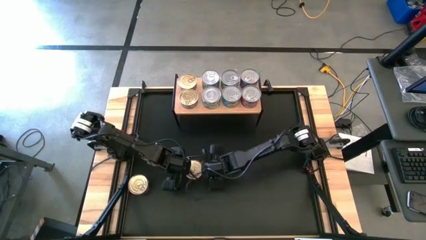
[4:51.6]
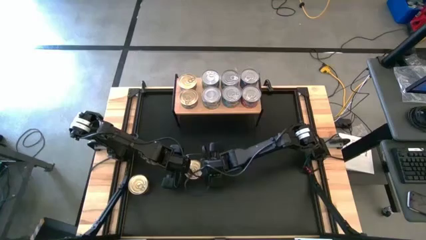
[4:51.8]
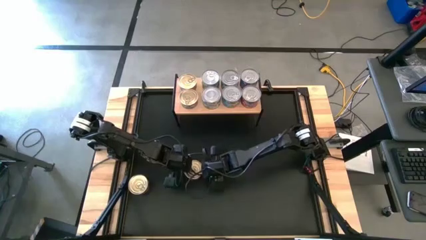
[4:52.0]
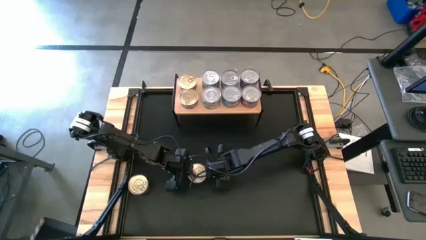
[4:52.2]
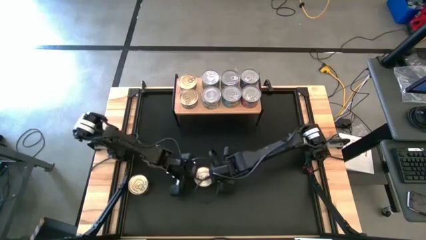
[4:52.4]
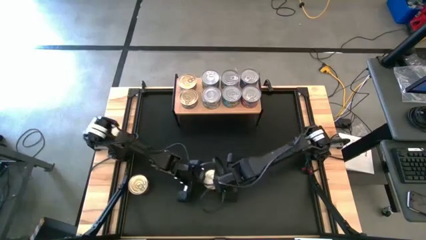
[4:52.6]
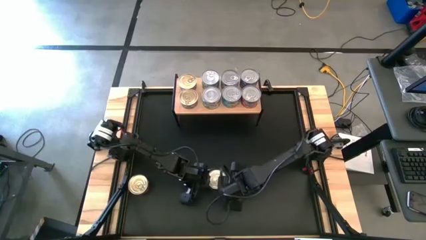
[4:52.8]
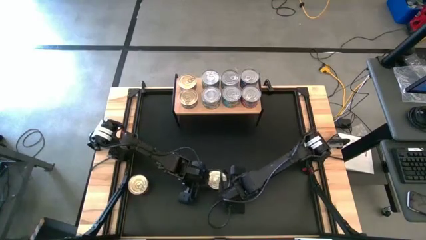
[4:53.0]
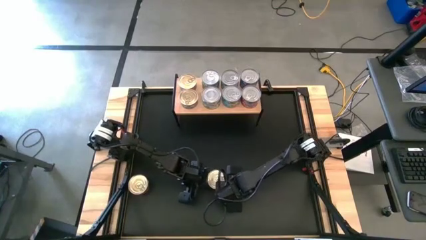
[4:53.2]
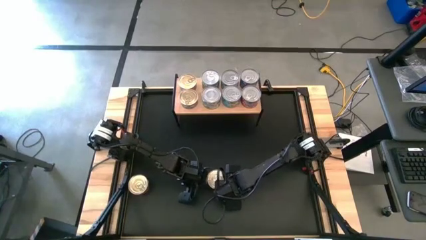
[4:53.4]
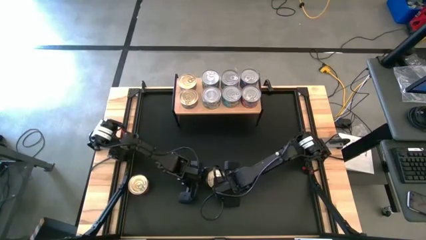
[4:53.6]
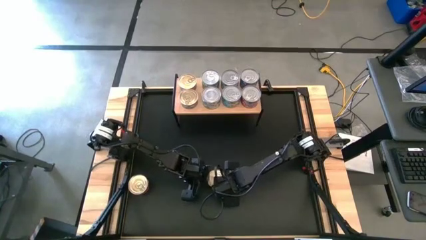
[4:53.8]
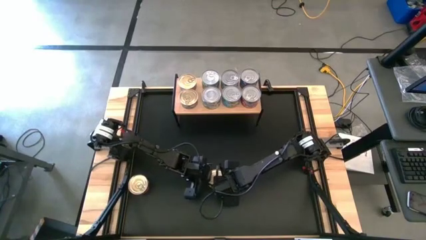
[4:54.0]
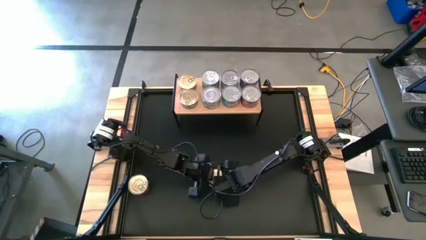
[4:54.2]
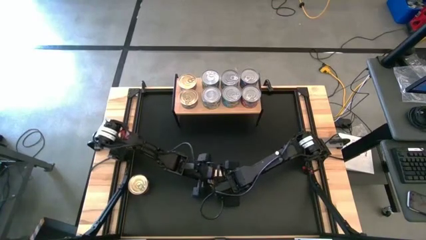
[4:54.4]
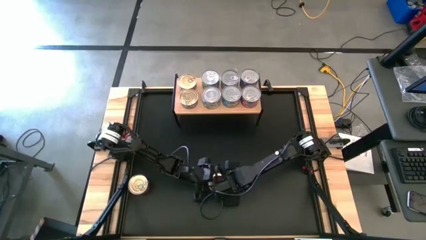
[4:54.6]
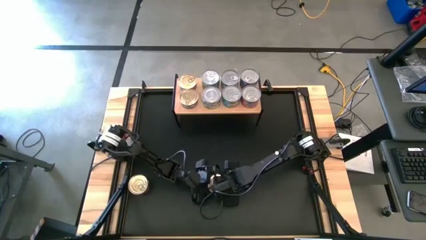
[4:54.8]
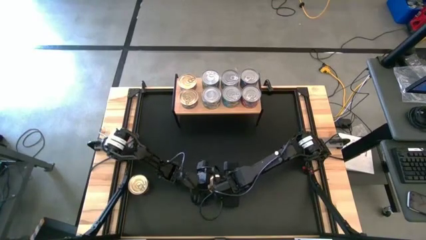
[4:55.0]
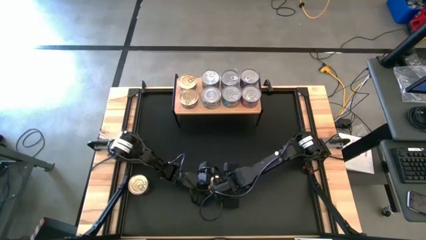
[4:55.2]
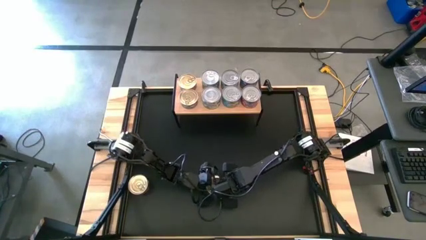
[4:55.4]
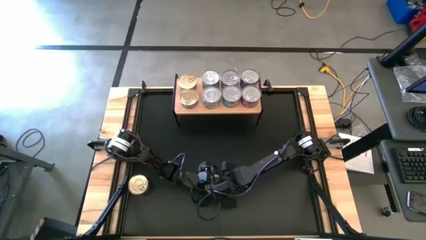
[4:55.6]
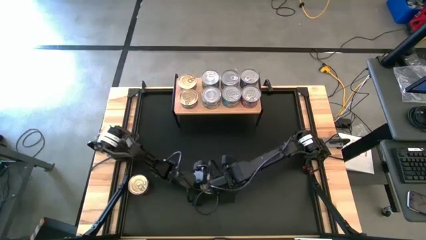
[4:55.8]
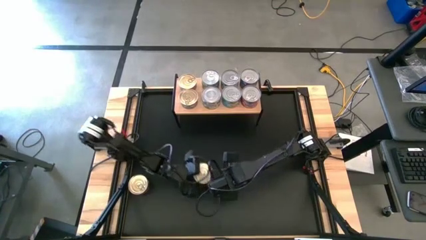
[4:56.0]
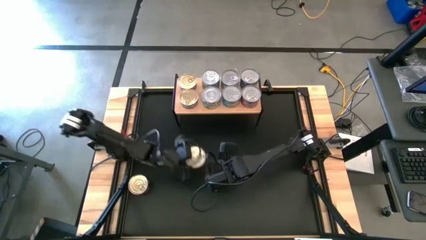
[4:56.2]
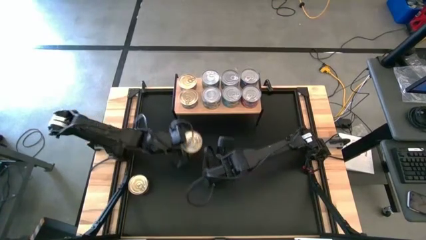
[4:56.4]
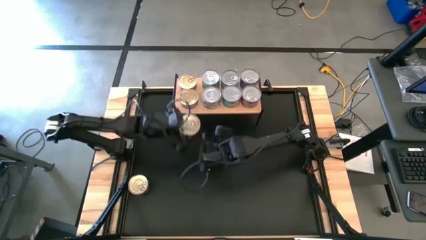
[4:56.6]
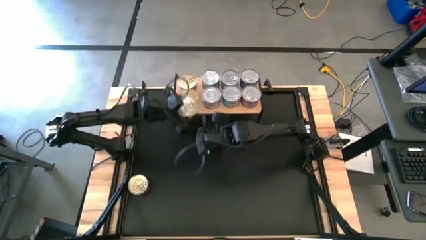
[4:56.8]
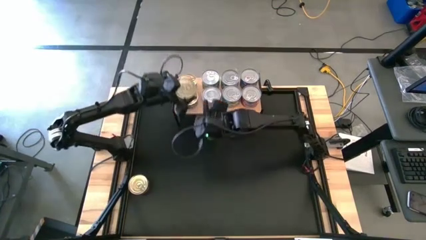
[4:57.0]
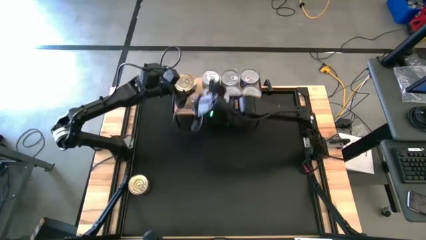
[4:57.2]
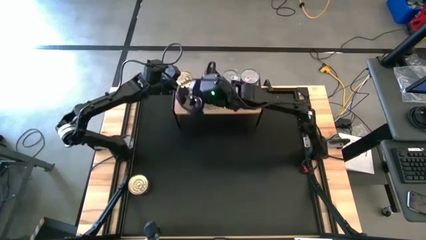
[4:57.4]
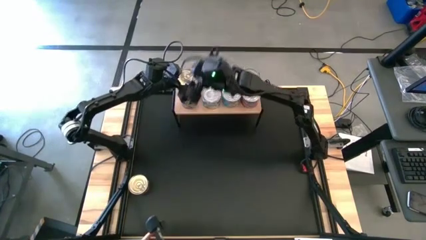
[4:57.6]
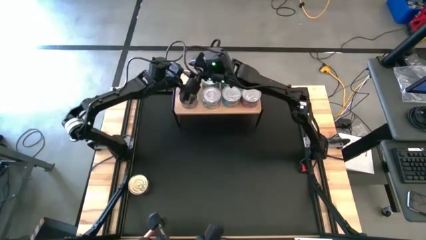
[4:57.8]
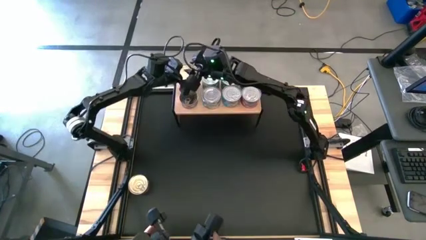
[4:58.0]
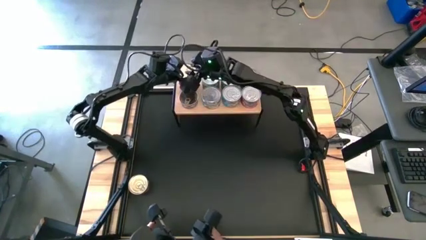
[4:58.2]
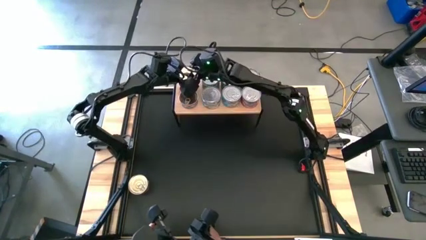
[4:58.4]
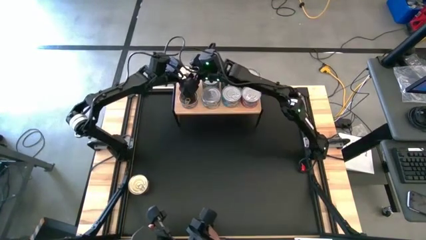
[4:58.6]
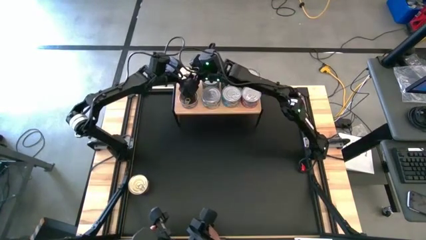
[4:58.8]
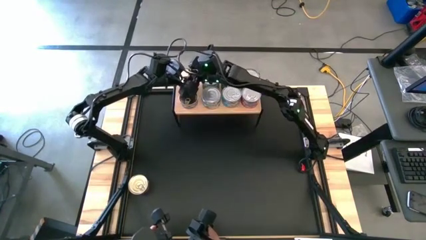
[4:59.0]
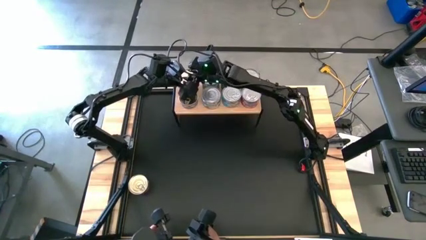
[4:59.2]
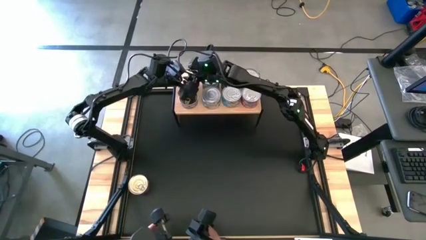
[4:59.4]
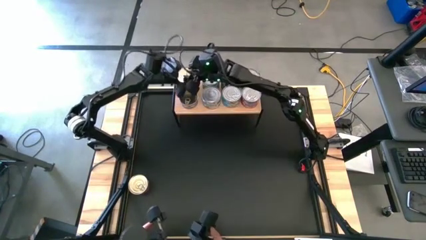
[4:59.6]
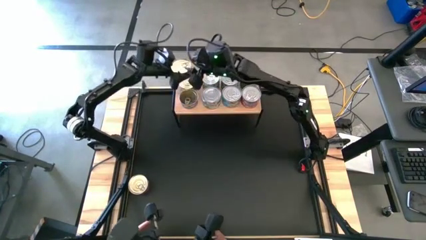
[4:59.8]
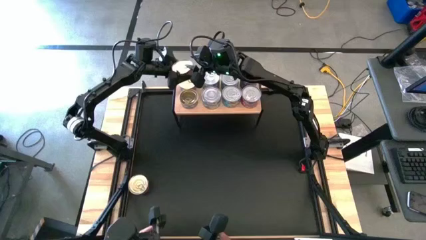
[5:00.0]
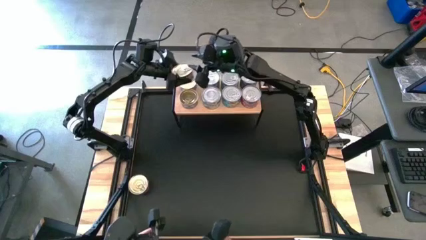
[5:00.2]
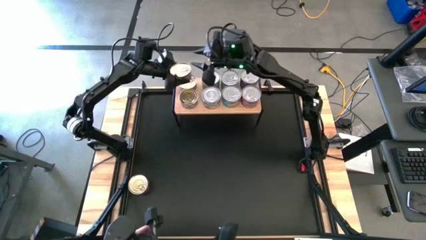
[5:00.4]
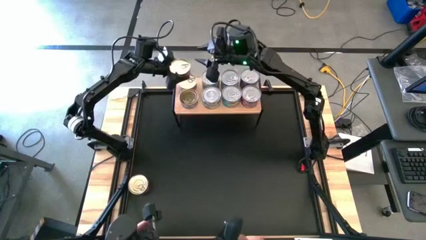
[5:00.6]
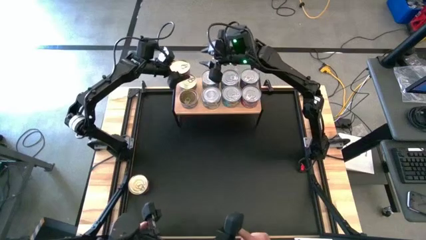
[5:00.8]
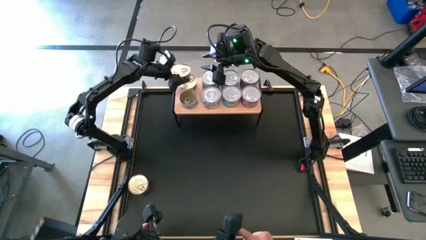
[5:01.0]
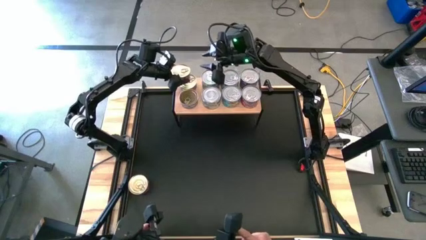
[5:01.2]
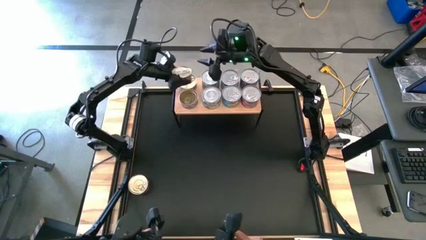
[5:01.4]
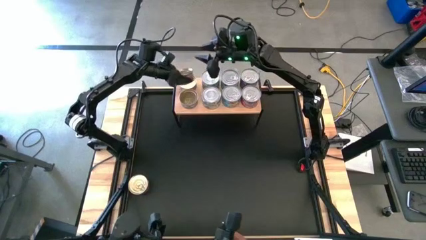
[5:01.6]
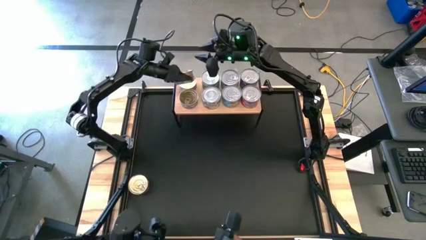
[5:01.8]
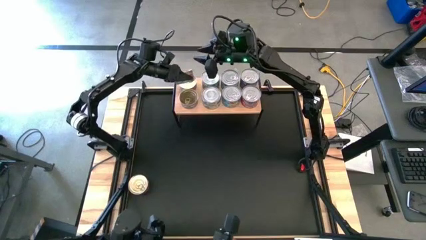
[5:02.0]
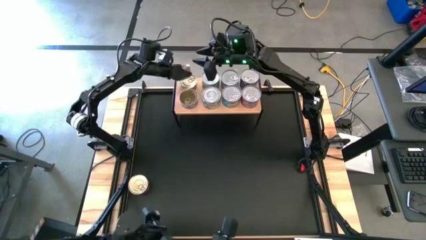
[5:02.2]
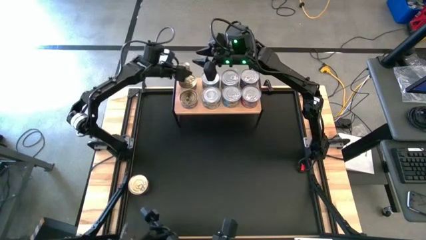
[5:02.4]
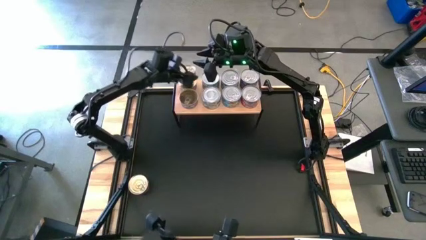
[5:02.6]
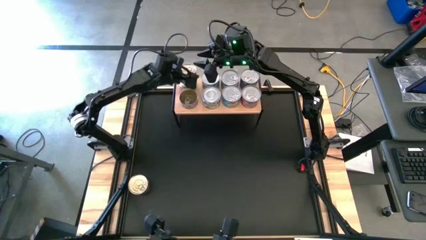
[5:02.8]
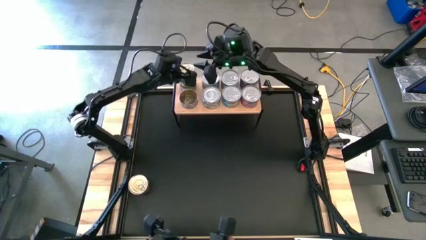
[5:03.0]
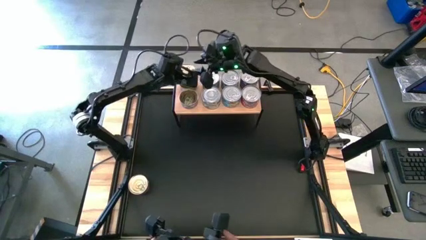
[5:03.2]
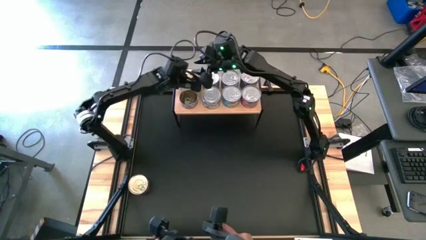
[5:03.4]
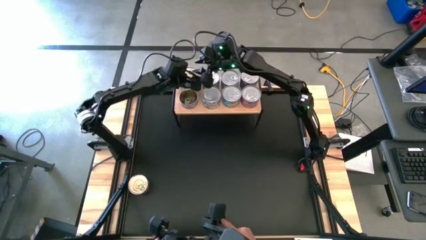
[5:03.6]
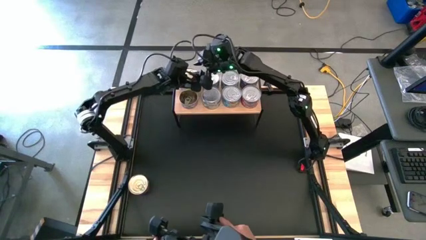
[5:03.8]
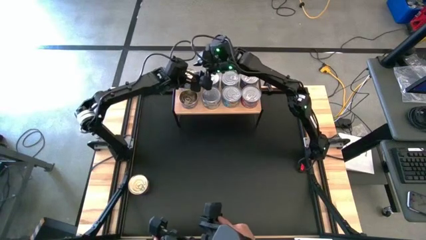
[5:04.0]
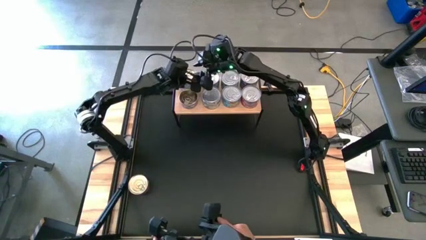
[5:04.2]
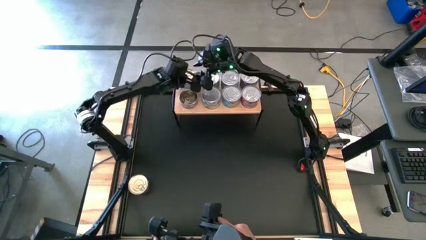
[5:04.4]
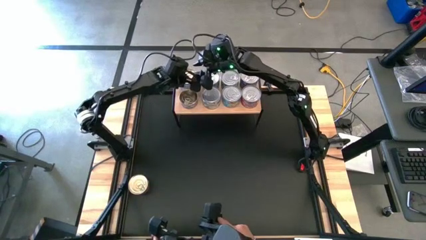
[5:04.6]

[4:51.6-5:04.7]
Task: Stack canned seafood by type on shelf
Stack the blue pink tuna can on top of the other blue pink tuna can on the shelf
